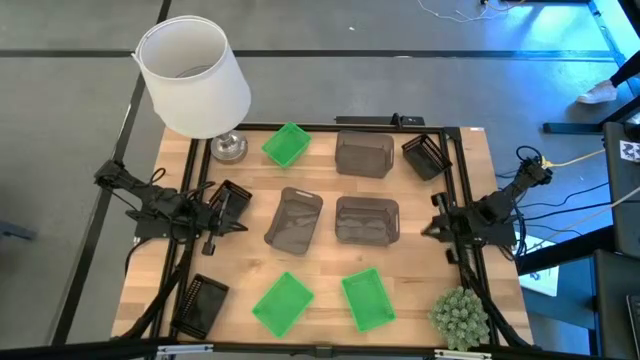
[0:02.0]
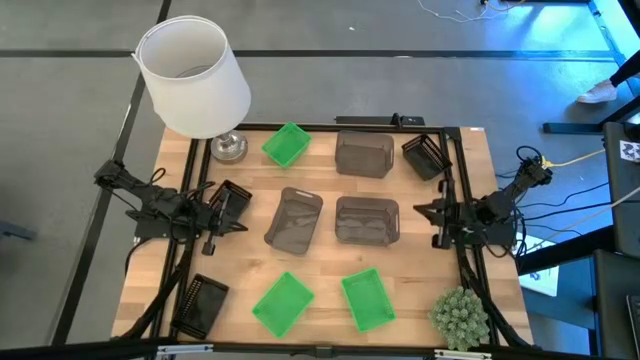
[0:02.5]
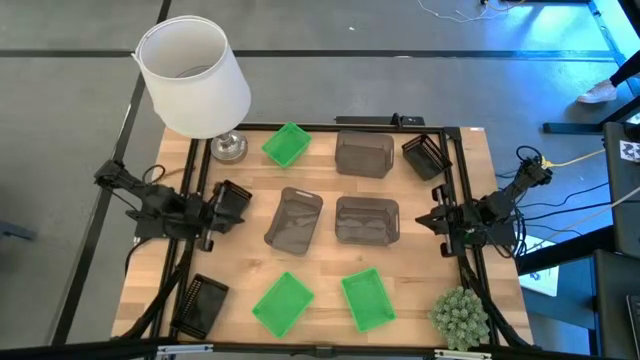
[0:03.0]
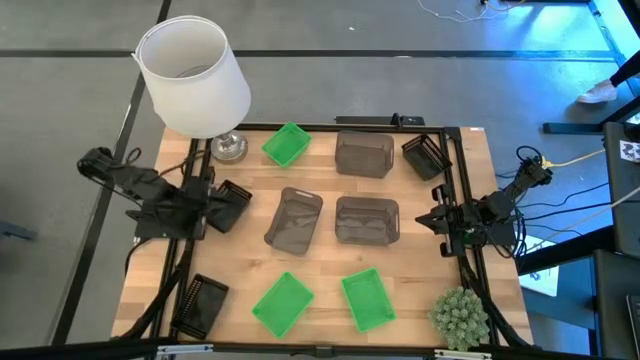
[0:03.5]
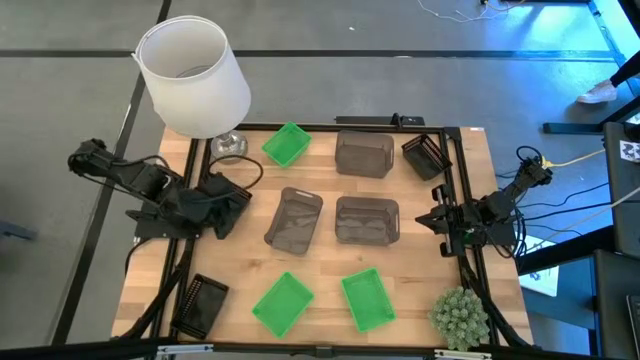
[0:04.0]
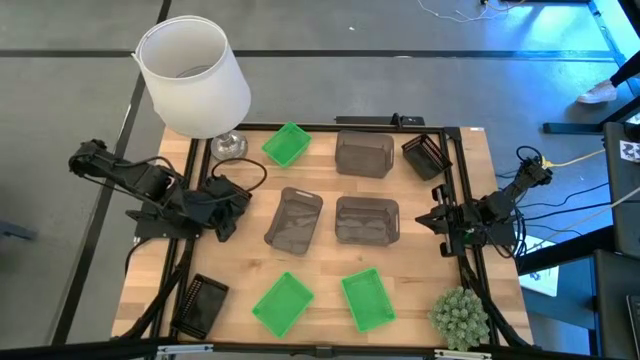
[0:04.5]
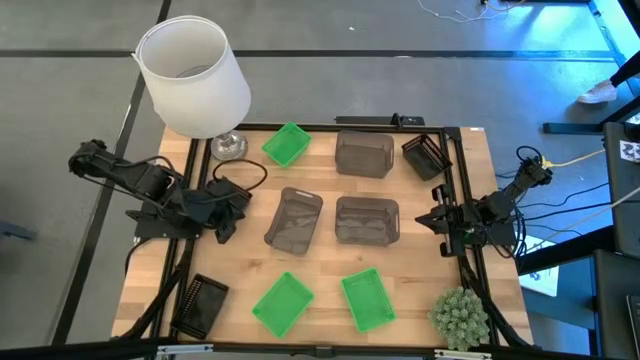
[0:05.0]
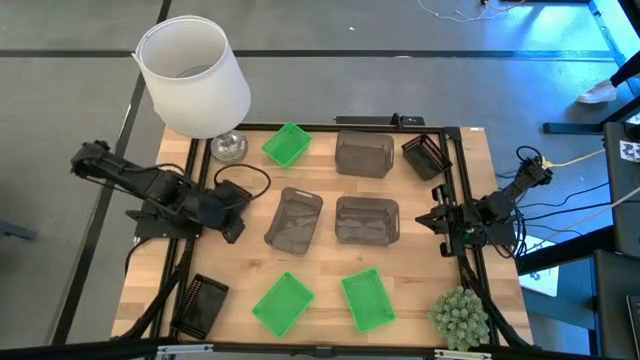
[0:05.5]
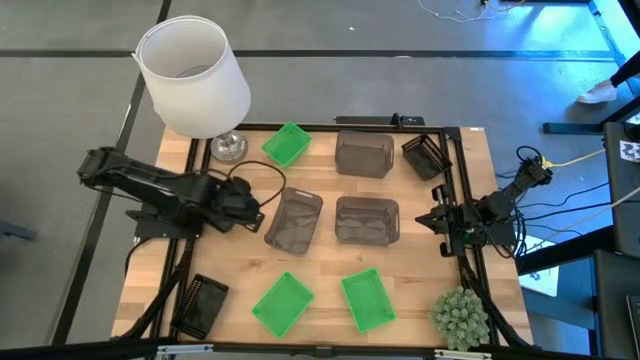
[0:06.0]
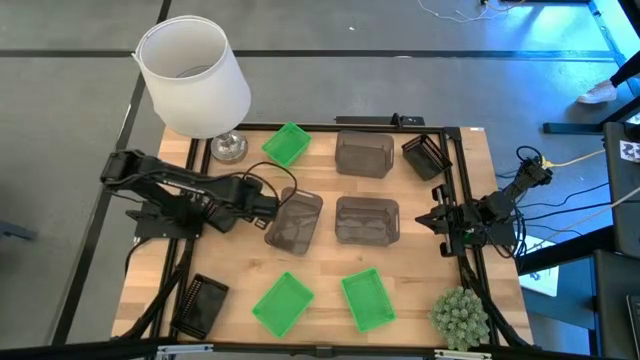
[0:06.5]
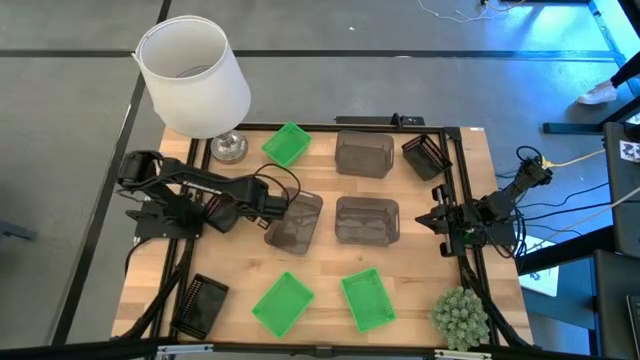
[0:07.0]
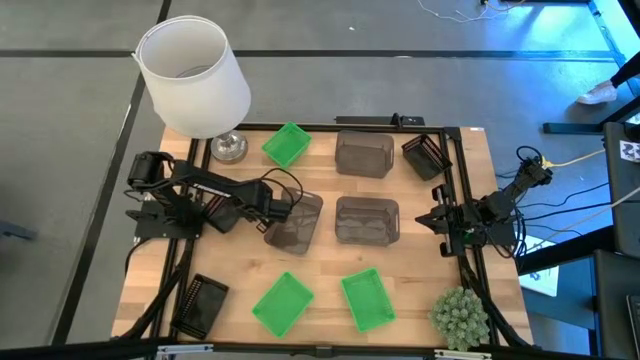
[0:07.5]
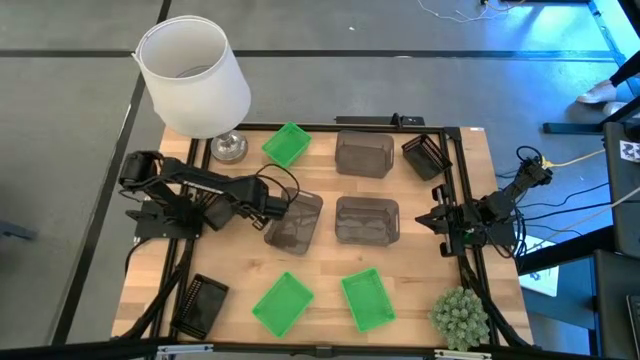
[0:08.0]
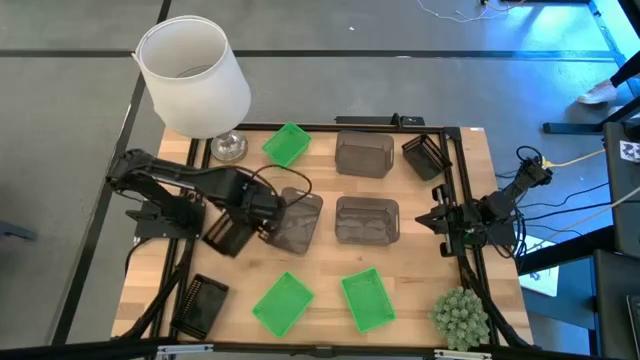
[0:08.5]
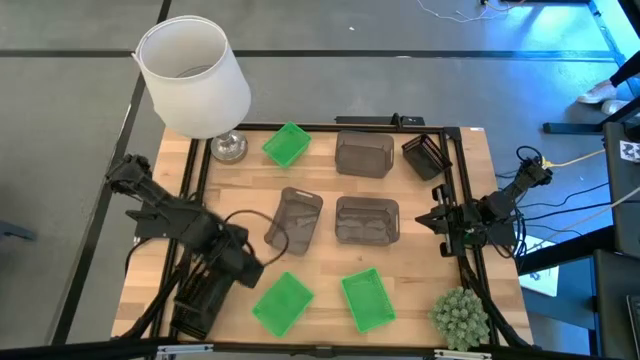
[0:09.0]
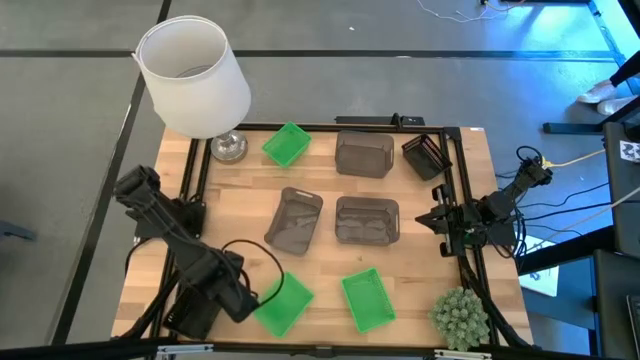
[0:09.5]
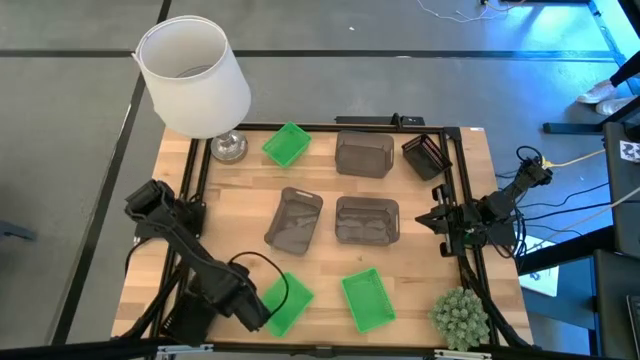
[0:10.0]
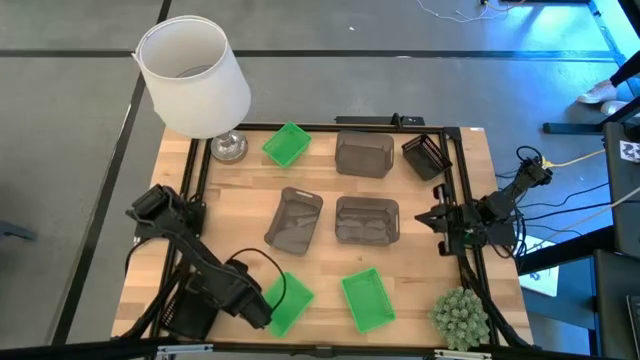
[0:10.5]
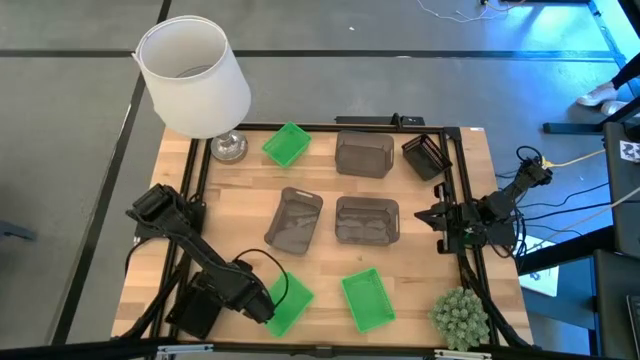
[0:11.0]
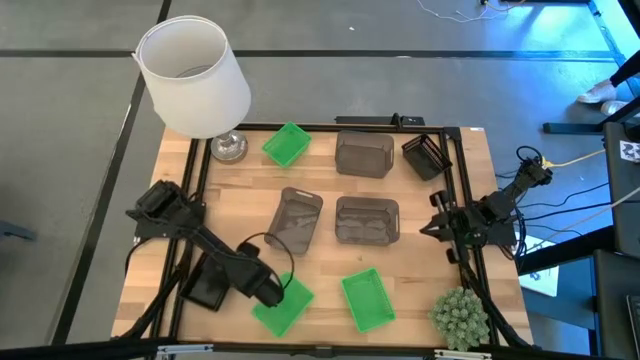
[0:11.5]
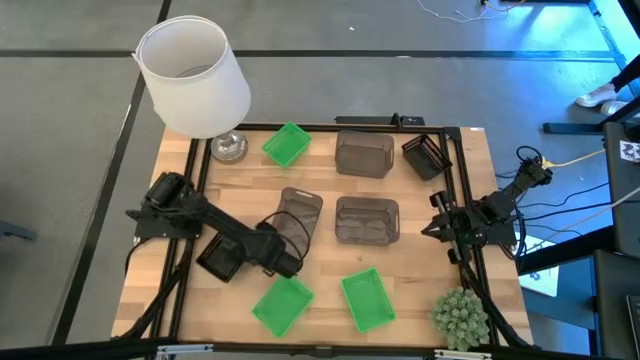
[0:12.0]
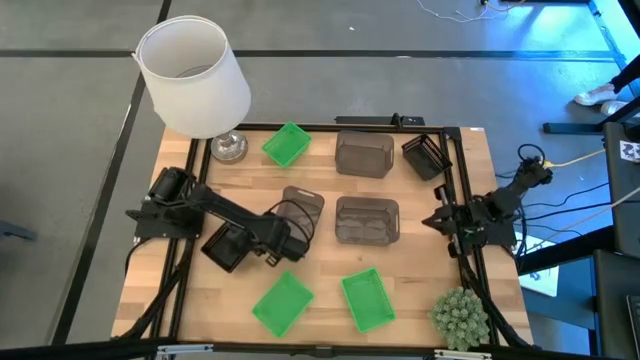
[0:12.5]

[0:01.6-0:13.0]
Stack the middle black bin on the bottom black bin

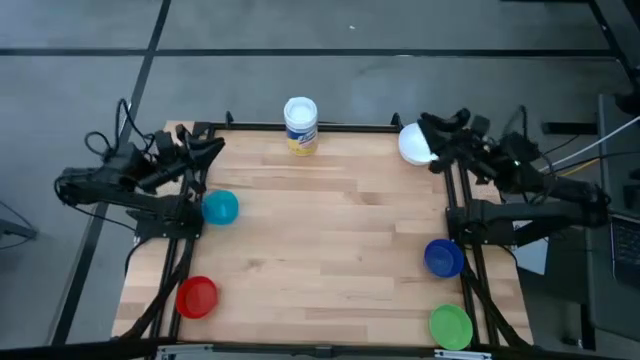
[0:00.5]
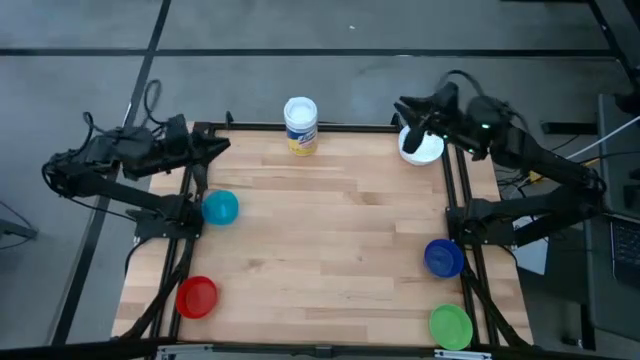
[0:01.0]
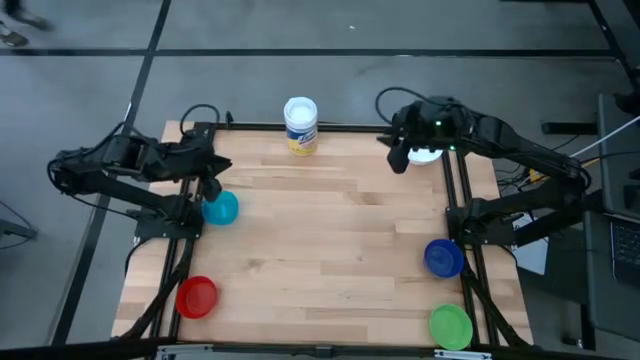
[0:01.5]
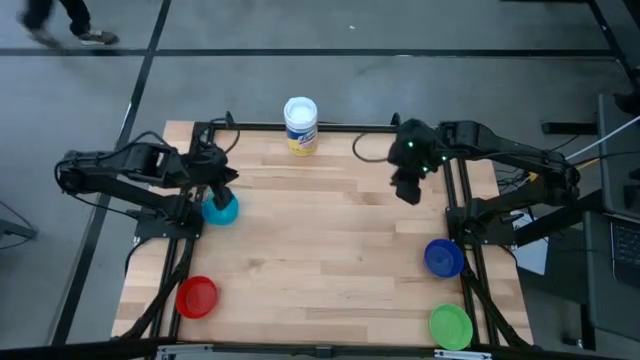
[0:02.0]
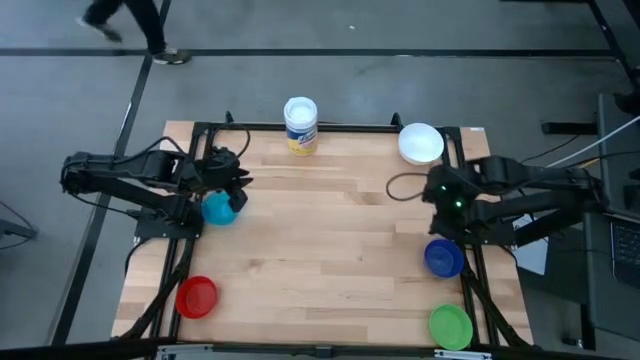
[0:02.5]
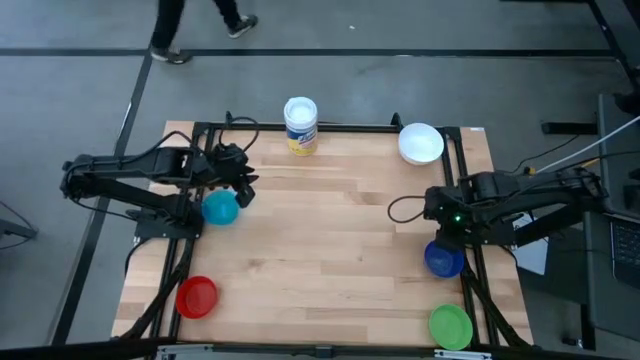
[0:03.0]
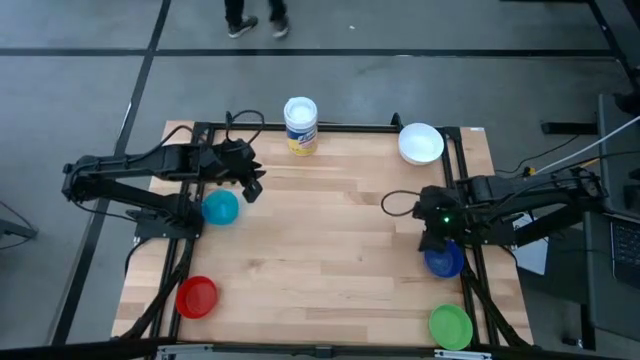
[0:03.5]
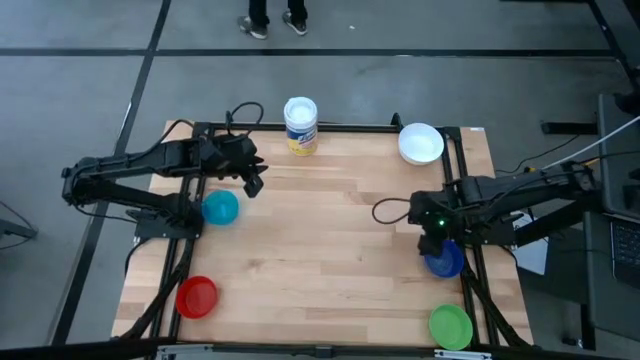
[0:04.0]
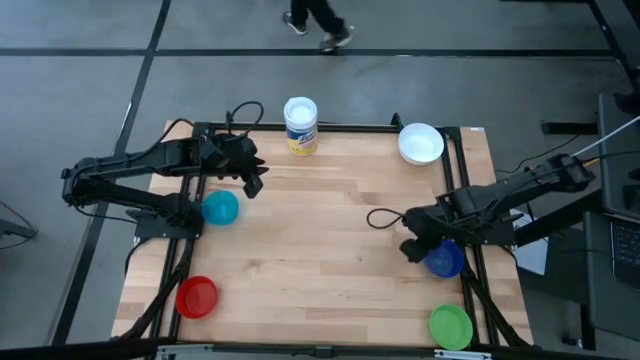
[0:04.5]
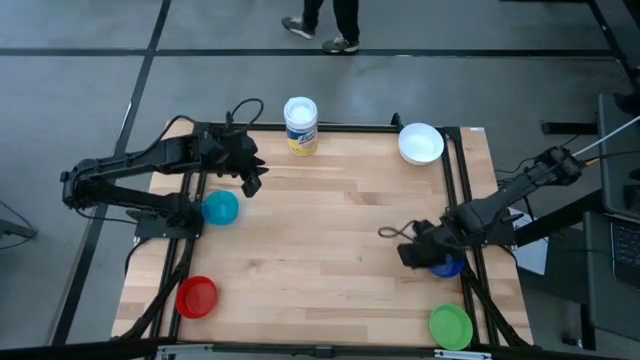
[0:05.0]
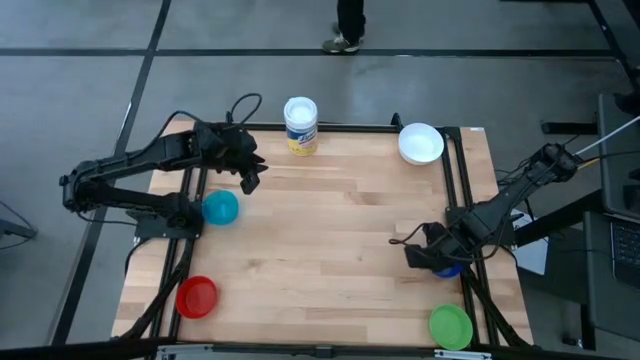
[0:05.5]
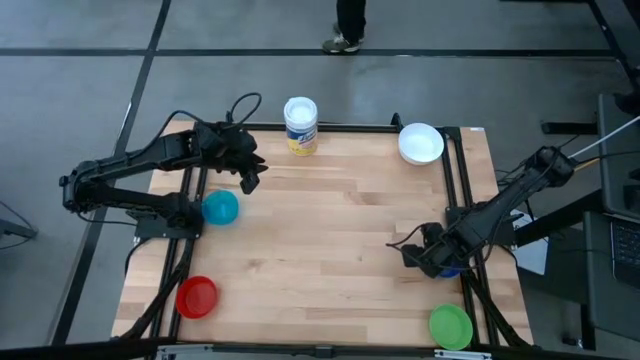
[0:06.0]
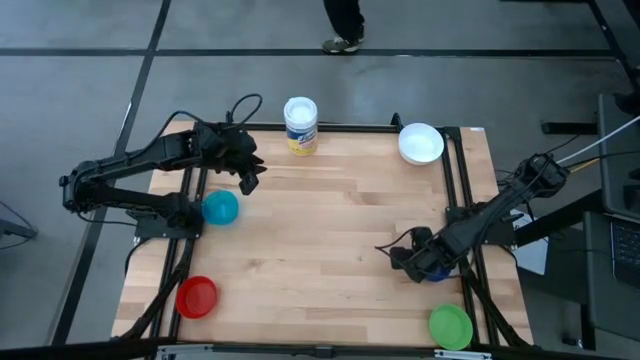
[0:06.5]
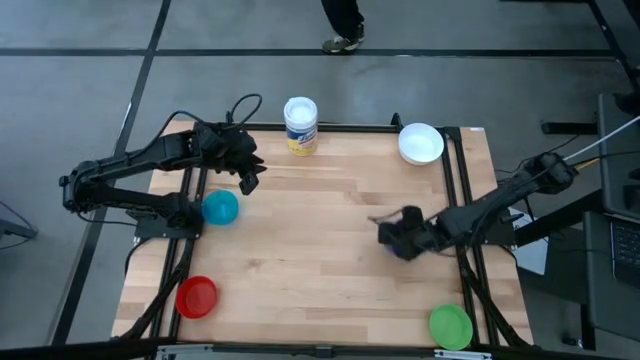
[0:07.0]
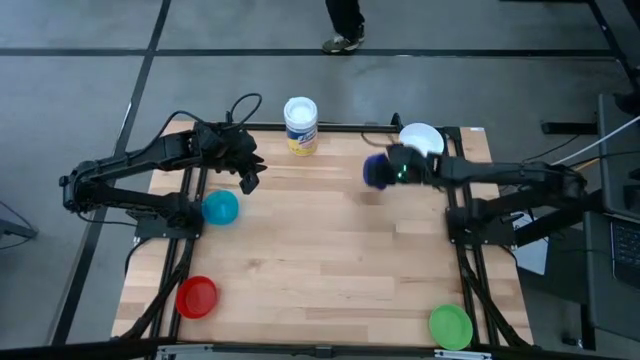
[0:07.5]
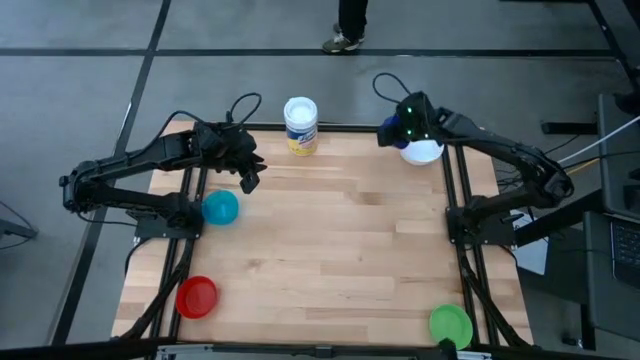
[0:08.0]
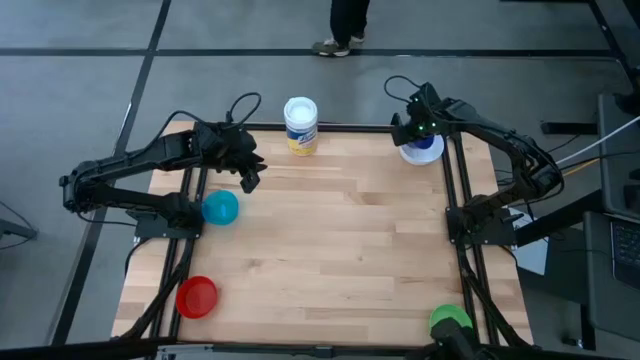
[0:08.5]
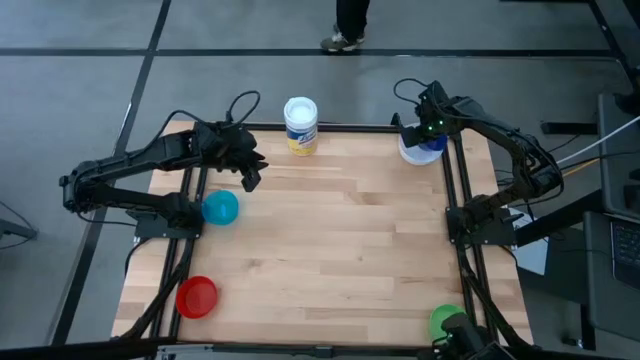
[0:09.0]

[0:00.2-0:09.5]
Stack the blue bowl on top of the white bowl
